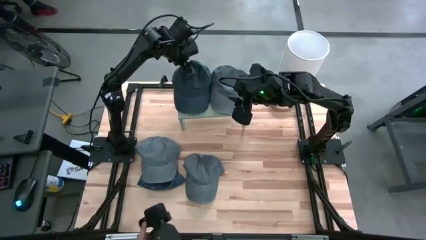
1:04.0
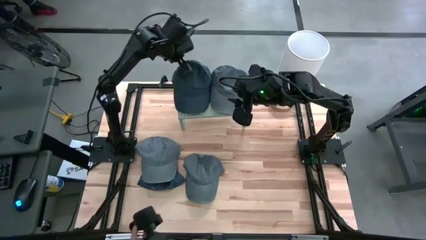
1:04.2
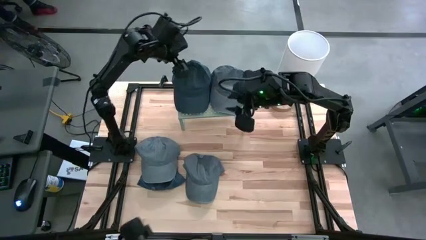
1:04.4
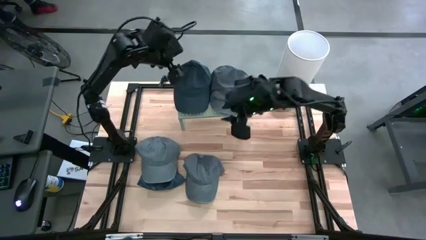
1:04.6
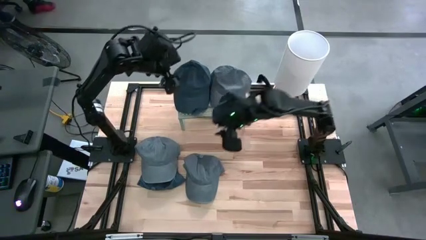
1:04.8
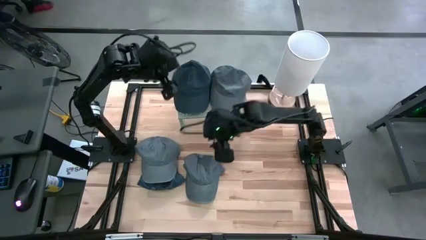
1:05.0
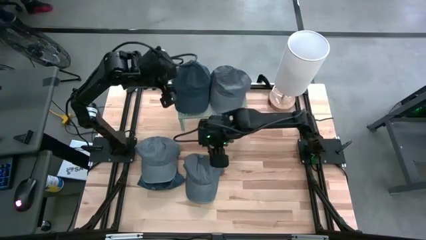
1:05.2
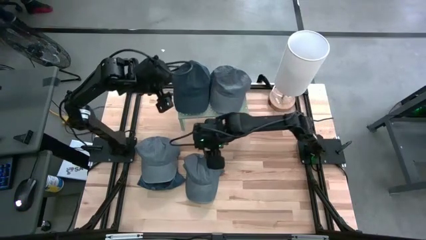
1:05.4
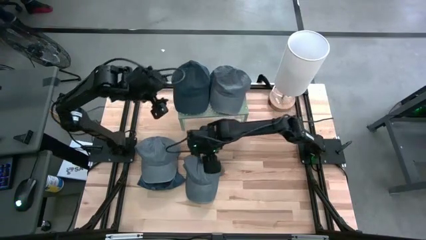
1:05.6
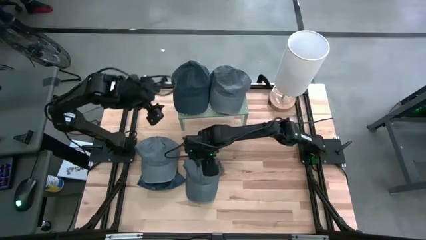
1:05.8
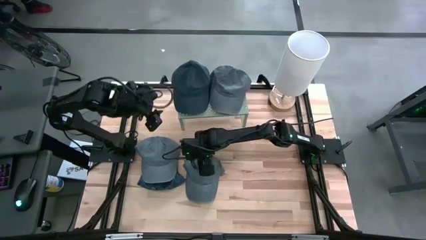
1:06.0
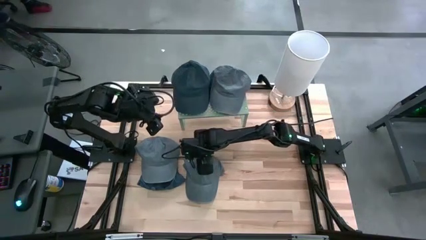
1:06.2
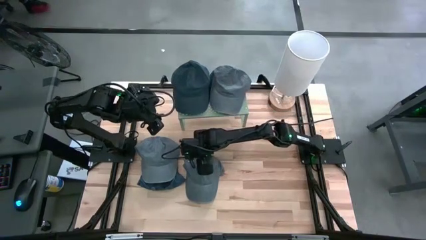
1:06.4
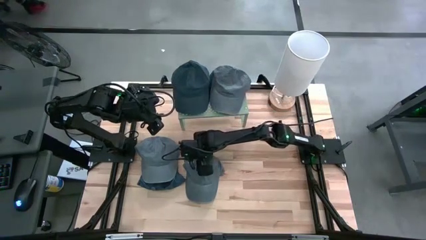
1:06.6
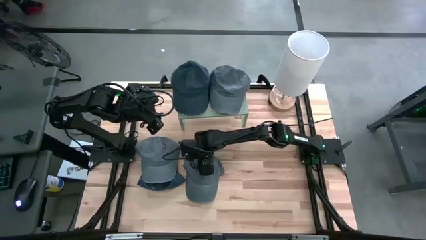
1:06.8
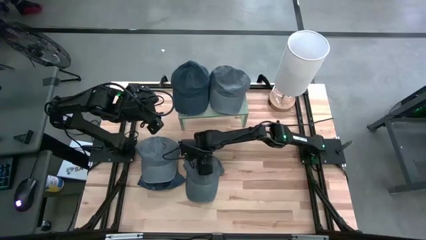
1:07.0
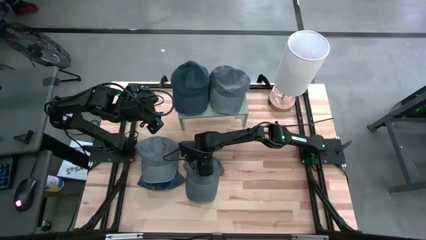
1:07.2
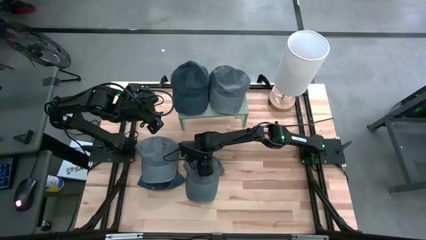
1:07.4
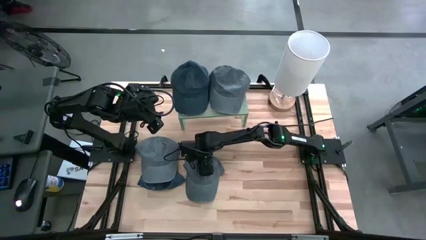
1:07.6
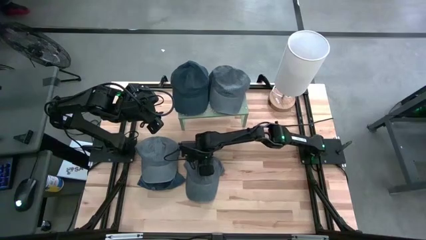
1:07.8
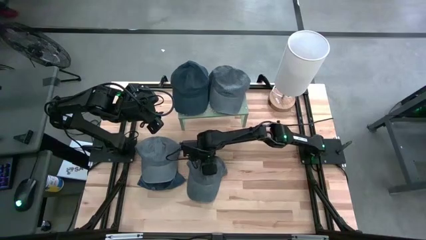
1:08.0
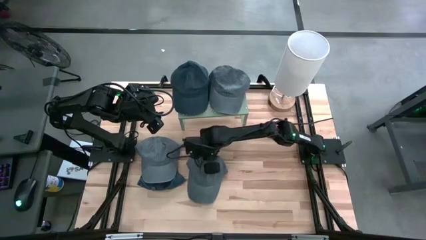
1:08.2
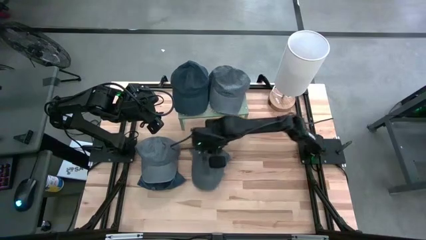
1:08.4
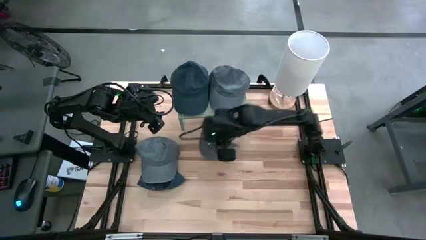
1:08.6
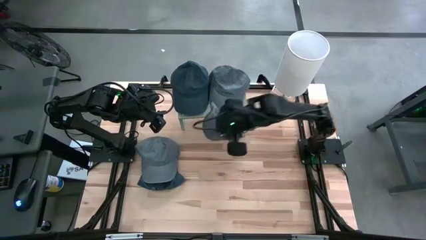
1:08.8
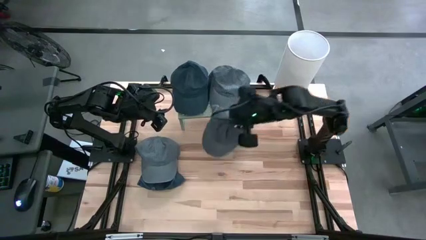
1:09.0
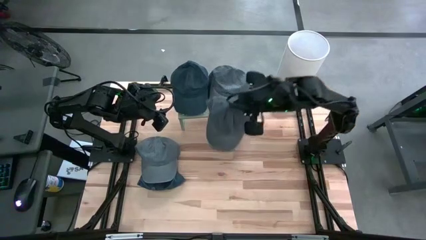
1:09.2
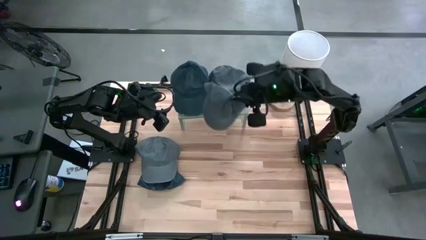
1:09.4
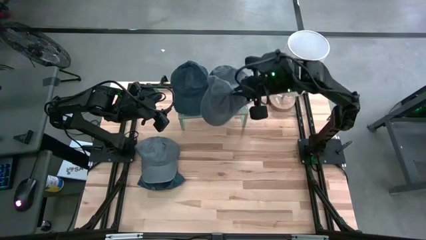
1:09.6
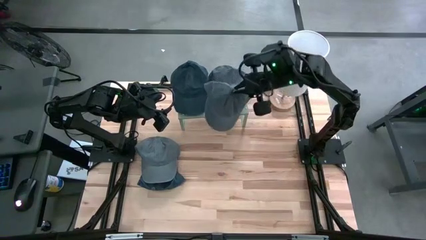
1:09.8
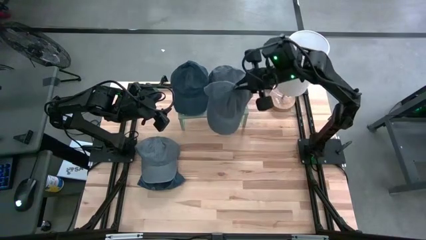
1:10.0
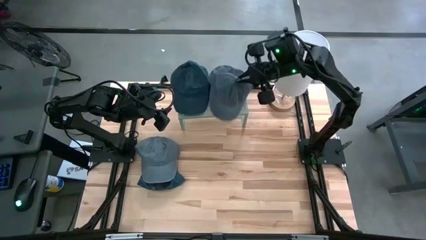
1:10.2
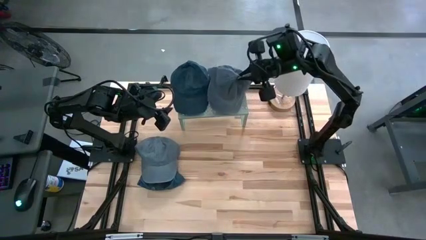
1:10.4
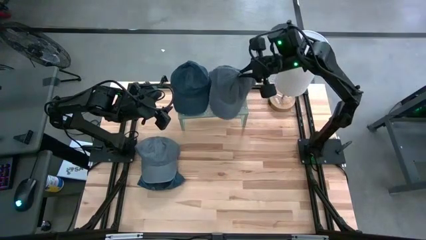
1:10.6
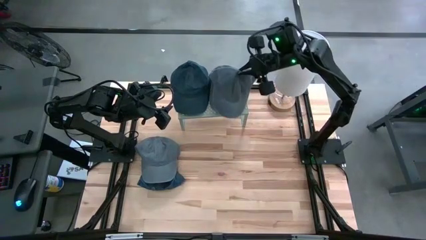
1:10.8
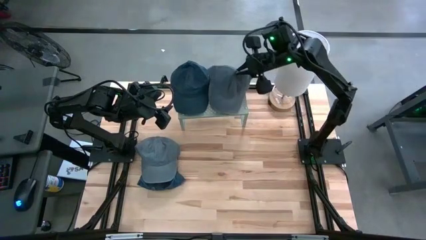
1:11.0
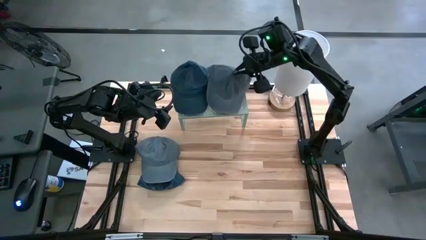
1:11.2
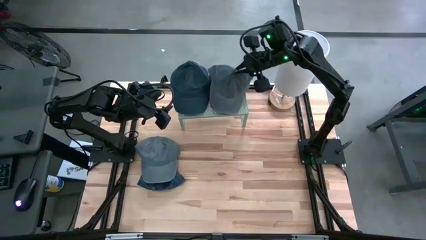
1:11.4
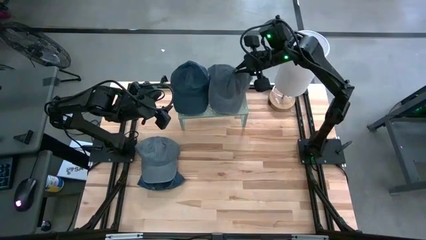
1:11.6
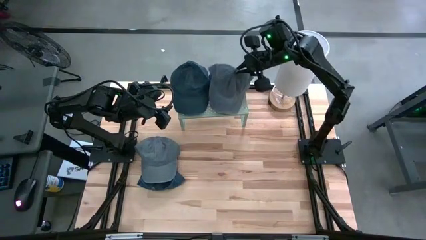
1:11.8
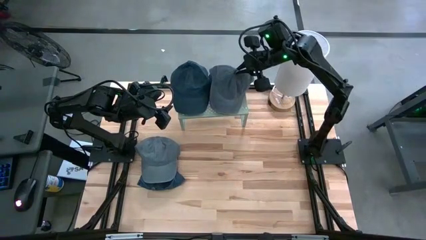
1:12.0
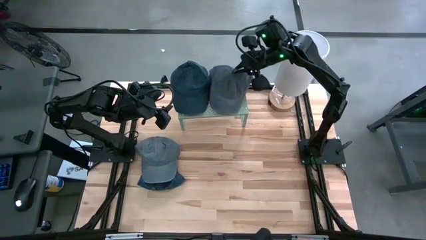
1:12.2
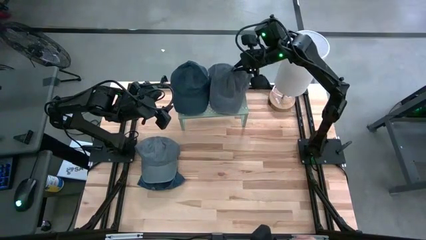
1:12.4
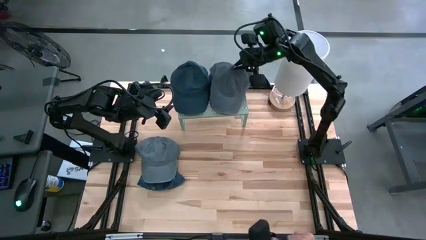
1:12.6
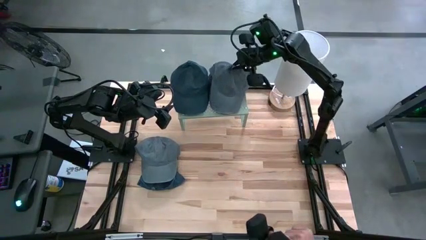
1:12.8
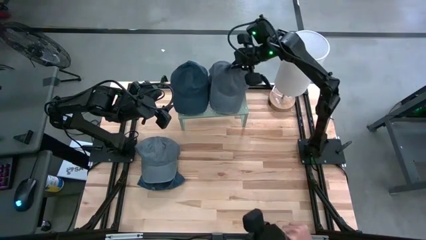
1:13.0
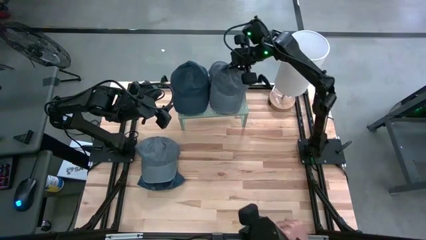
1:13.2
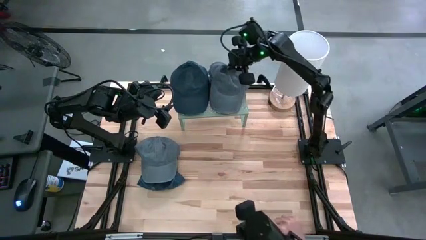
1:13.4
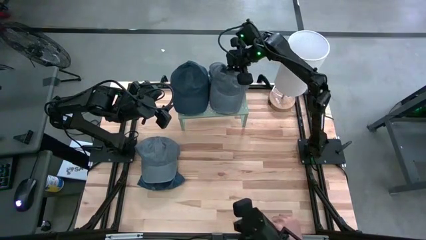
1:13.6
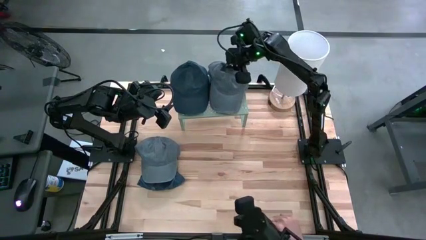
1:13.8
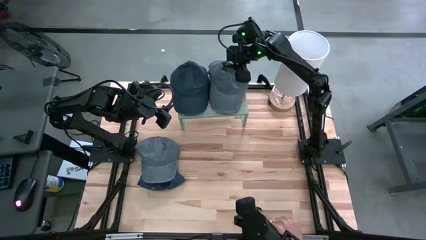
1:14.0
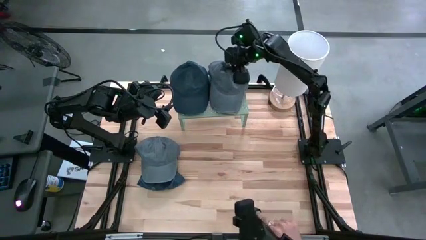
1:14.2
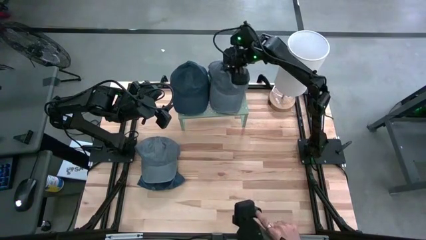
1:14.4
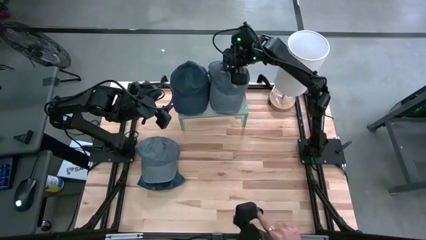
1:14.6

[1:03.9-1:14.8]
Task: Pick & Place hat
Stack the right gray cap on the gray cap on the shelf

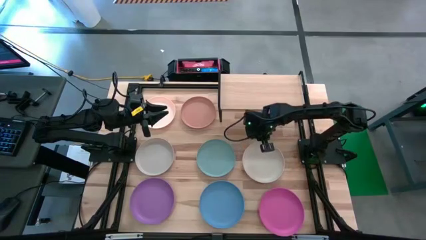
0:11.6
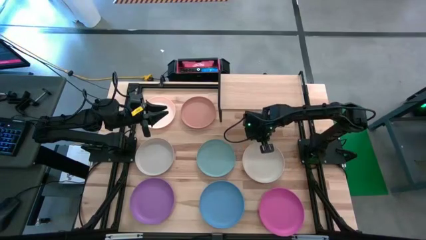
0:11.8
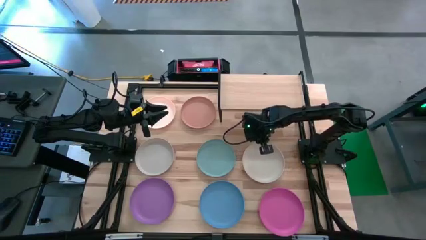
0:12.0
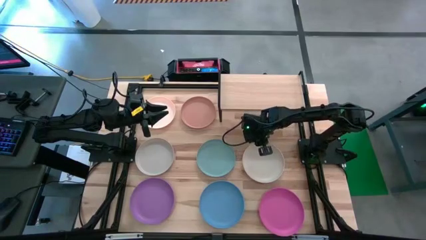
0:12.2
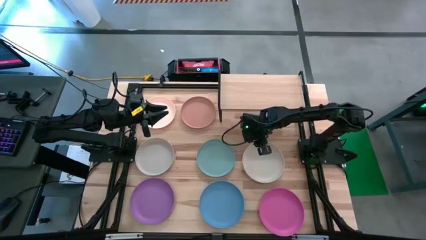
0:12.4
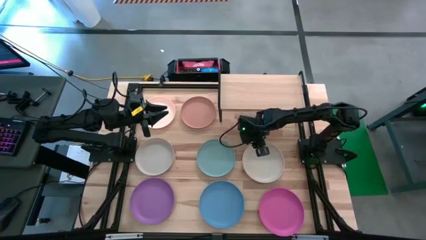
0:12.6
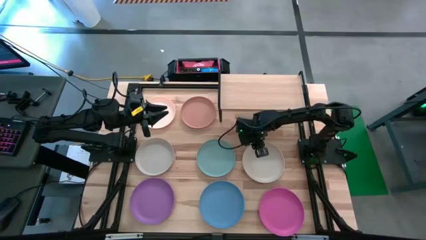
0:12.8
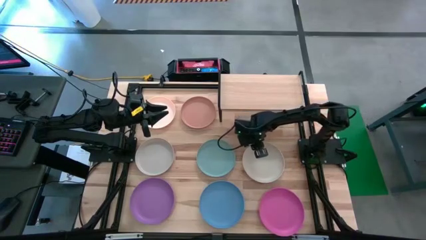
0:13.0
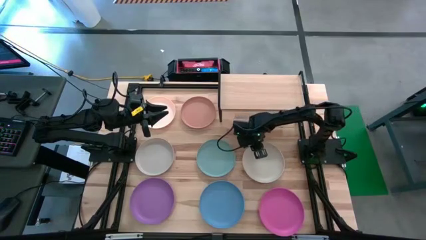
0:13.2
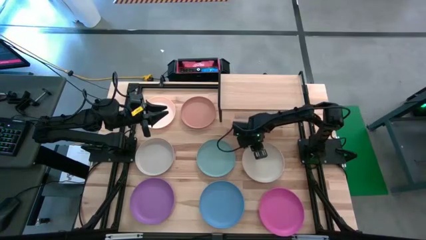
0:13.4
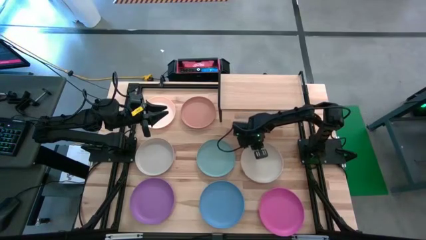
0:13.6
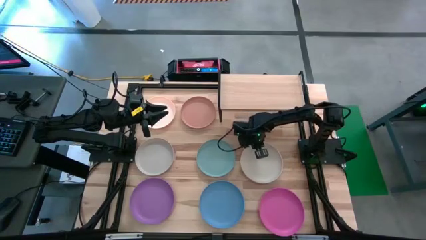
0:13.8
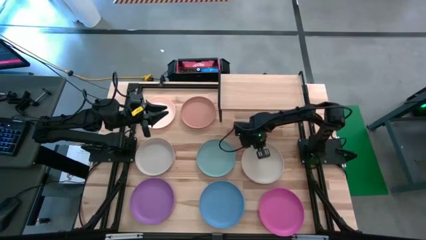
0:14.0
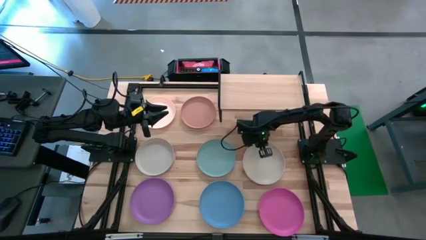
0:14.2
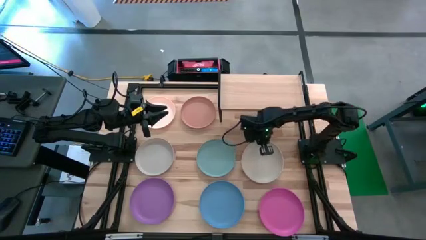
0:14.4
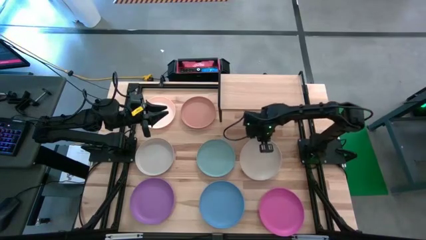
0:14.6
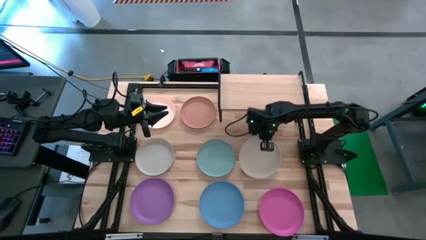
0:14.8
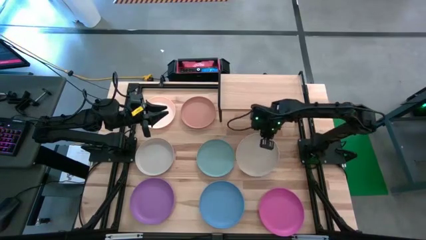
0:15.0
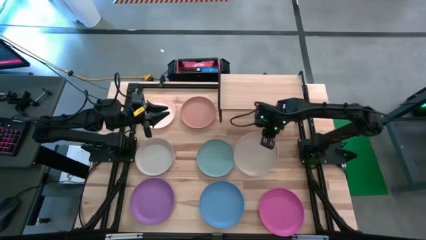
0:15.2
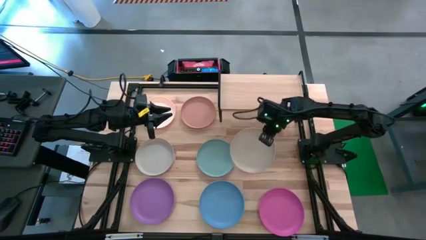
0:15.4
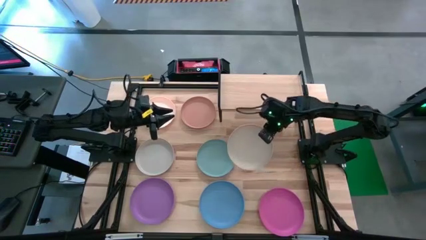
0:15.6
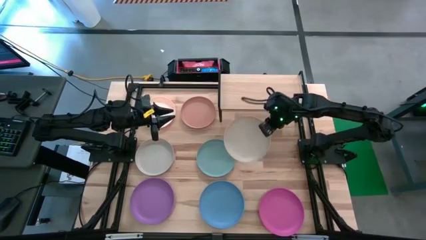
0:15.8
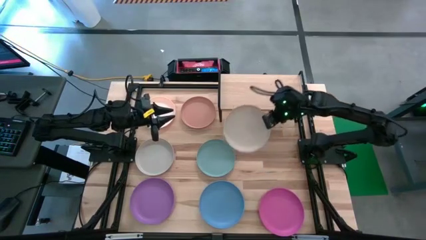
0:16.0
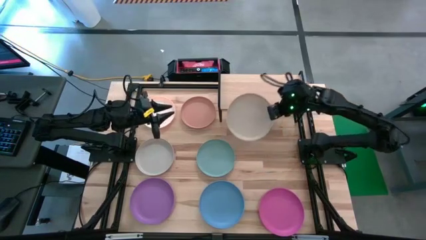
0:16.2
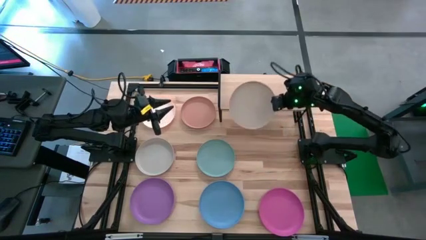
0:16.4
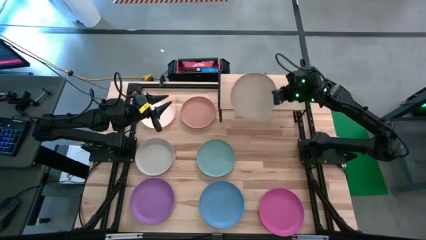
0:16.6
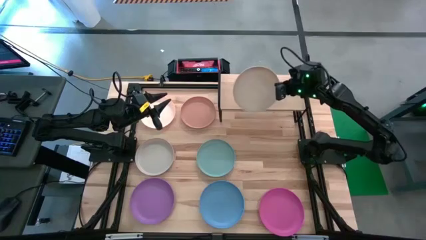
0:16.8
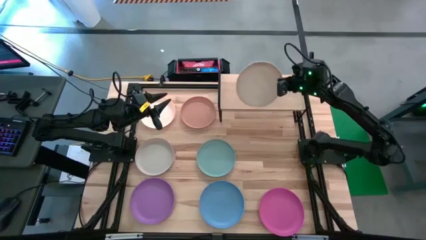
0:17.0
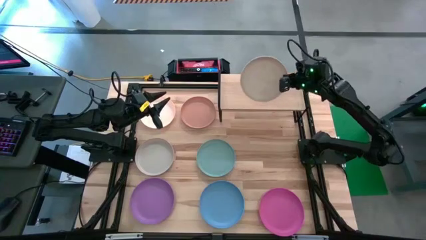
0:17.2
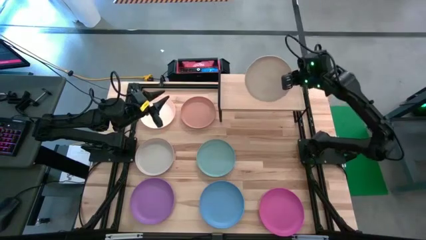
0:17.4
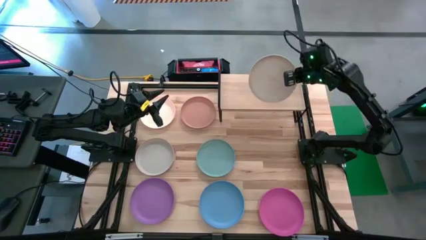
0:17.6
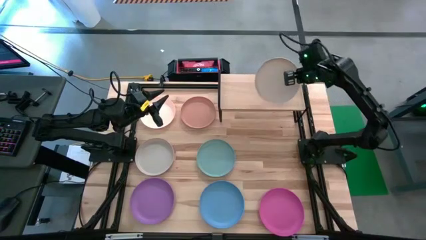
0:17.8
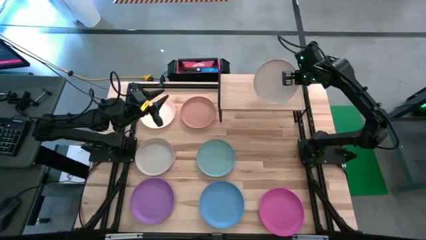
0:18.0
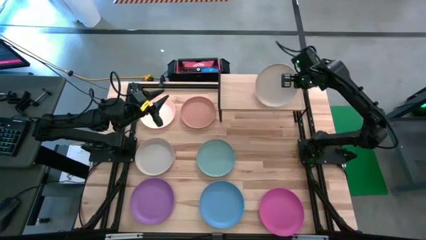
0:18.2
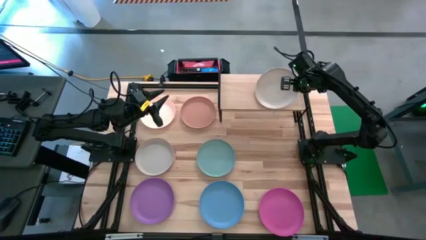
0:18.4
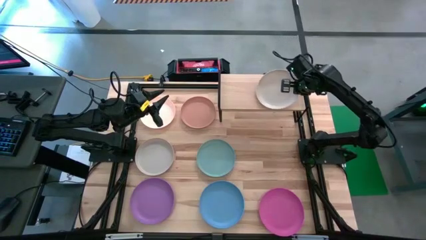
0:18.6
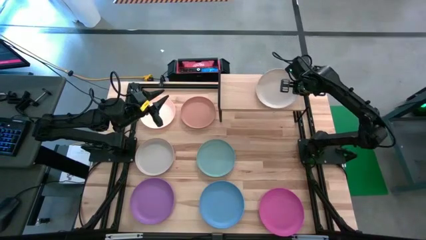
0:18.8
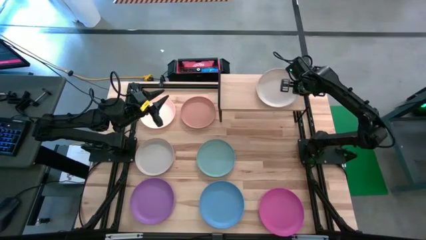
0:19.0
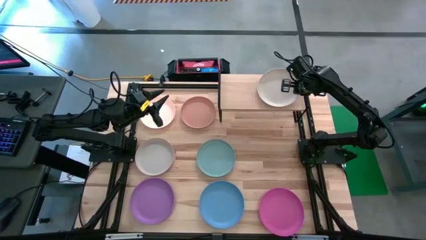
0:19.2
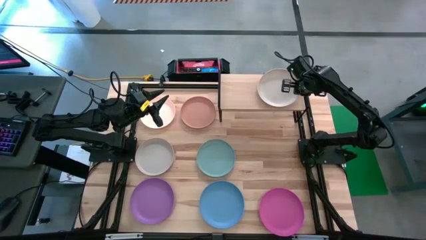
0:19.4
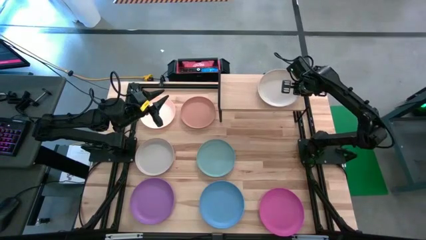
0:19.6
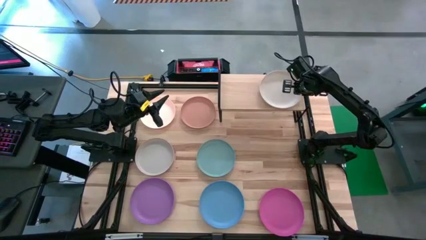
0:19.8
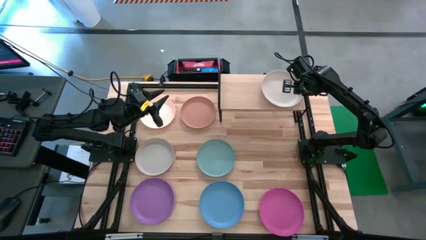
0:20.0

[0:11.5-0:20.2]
Task: Place and stack plates onto a shelf
Put the beige plate on the shelf
